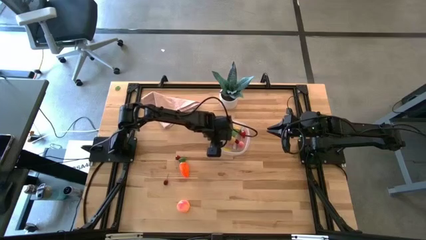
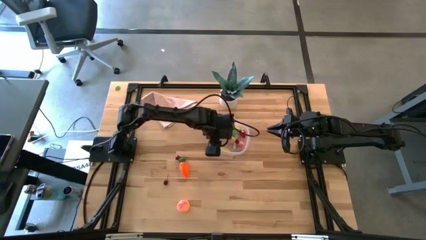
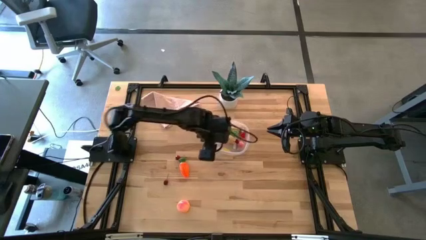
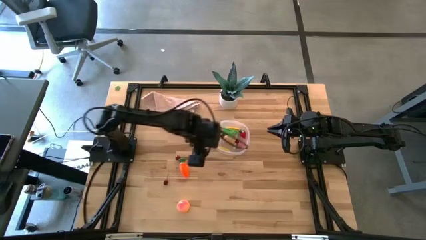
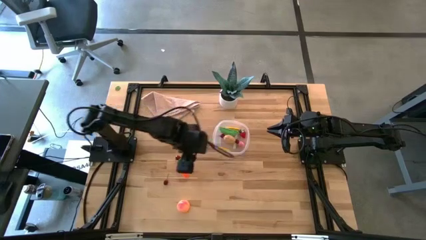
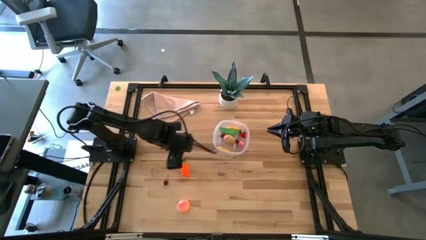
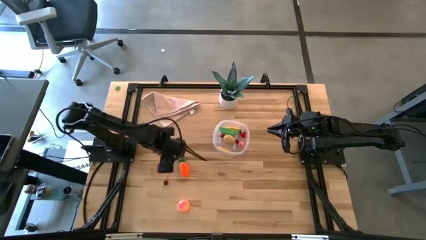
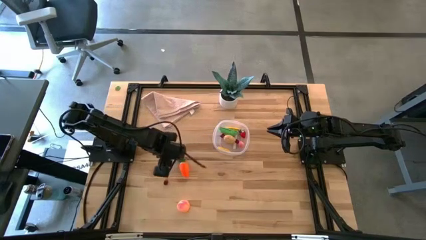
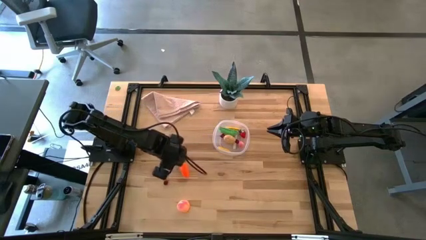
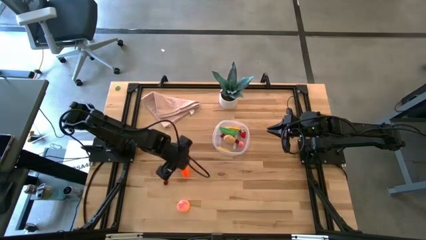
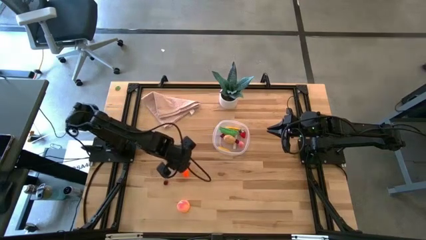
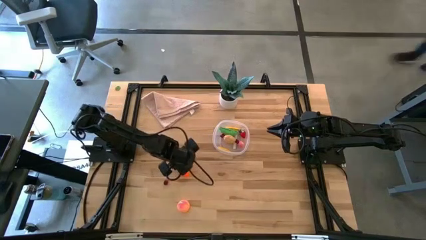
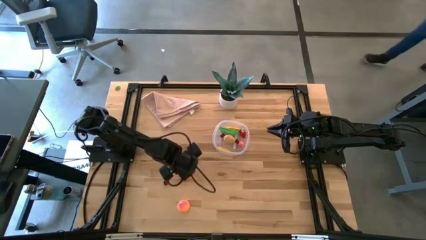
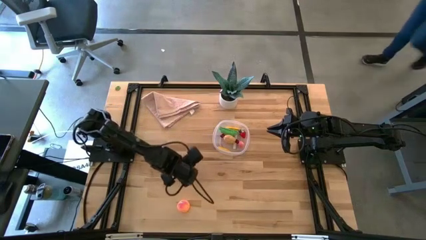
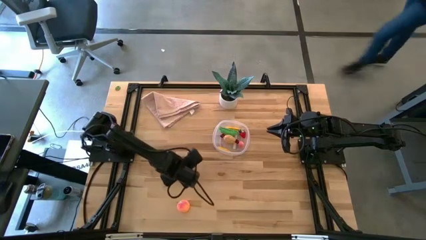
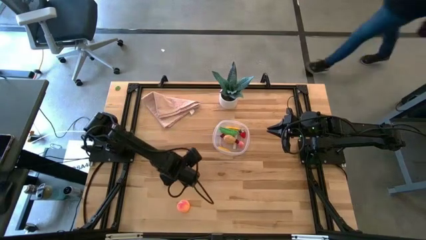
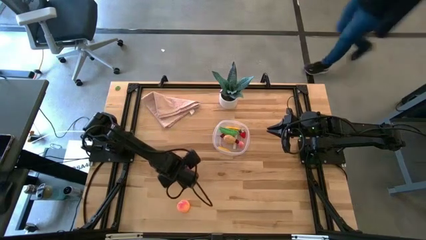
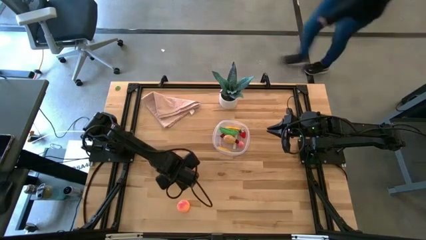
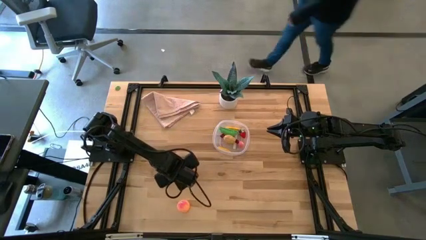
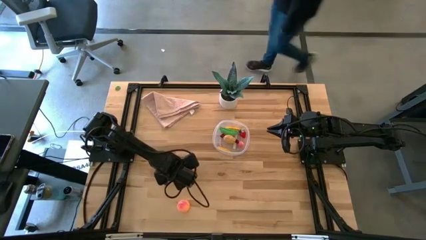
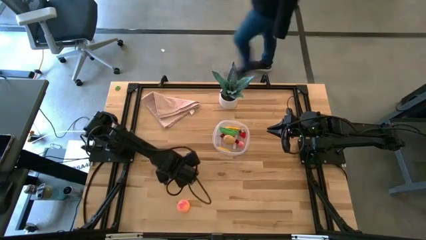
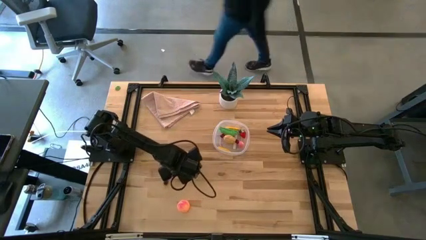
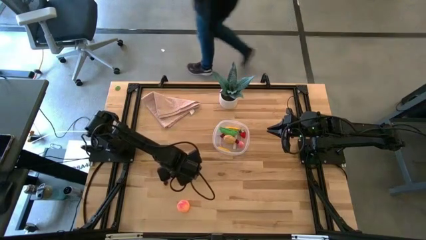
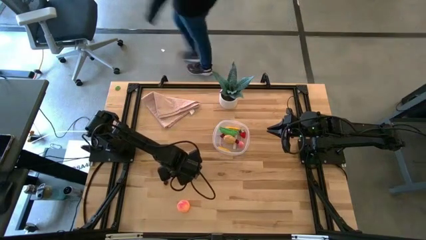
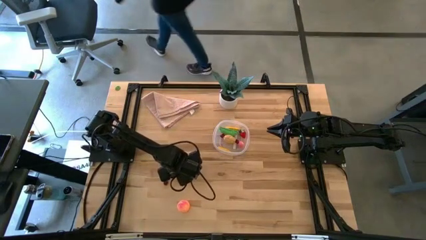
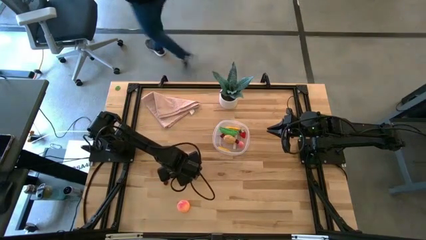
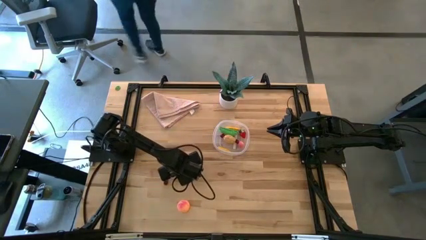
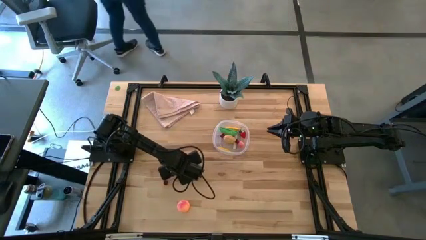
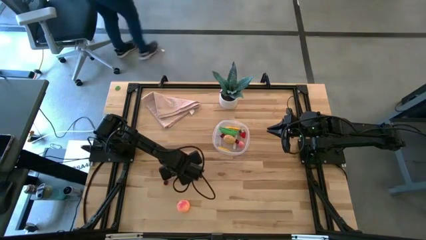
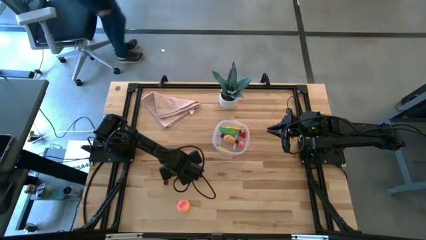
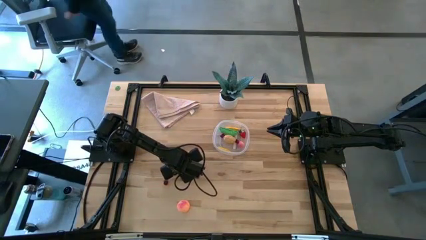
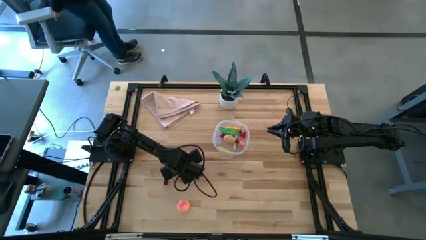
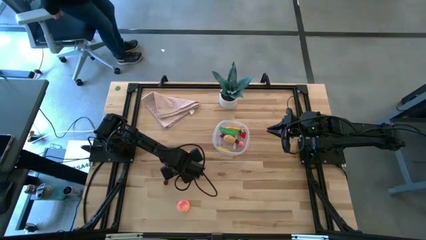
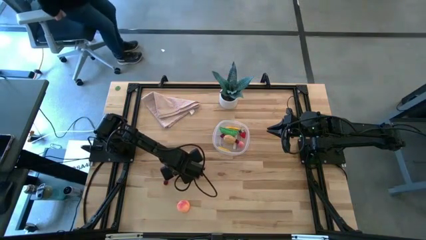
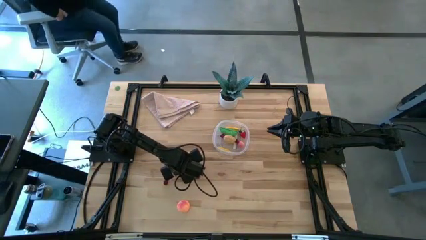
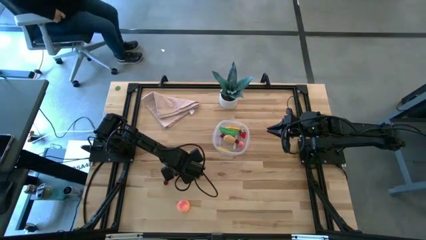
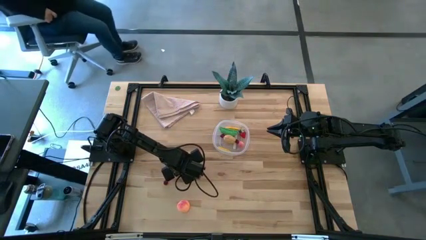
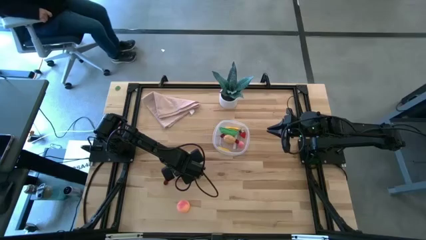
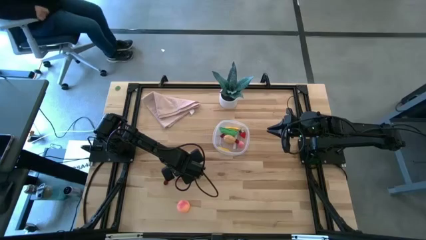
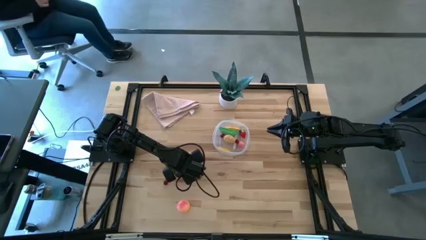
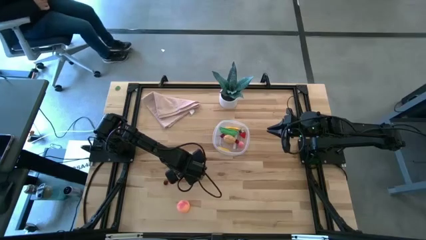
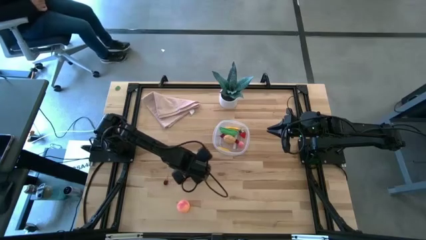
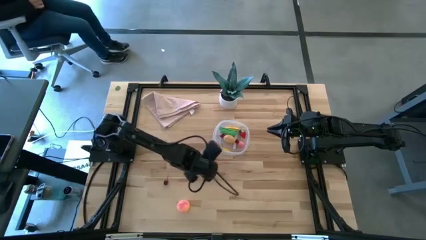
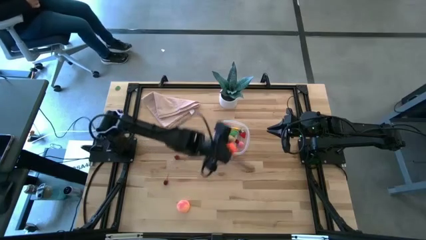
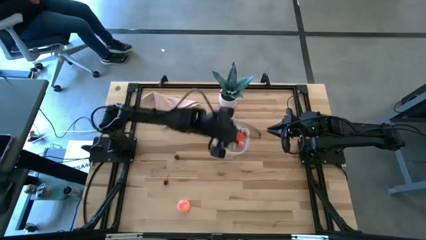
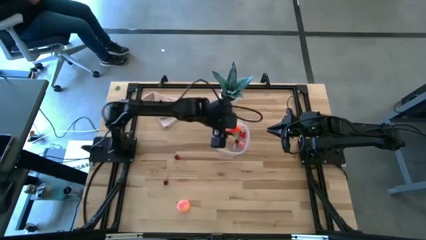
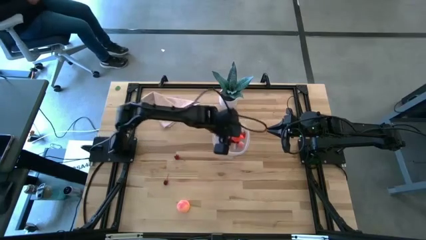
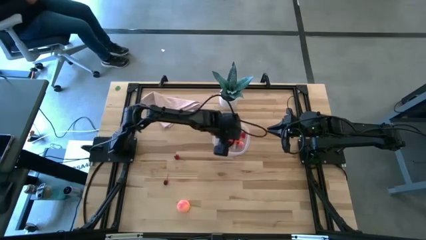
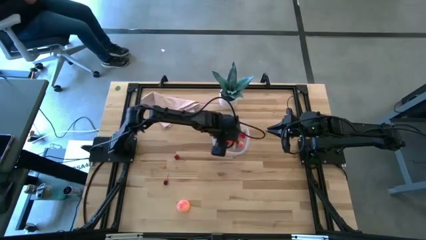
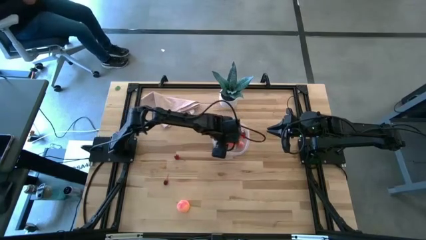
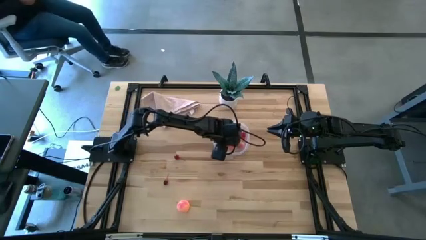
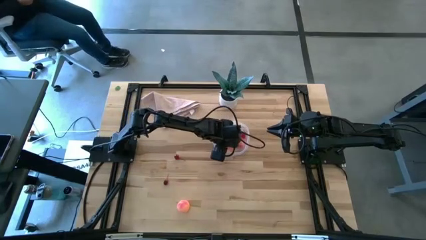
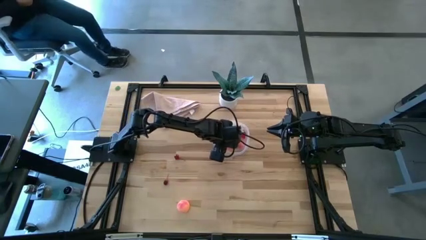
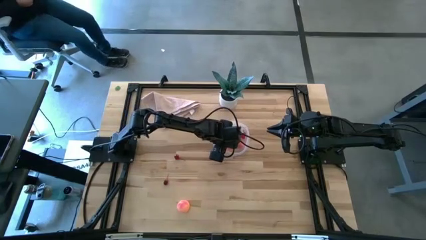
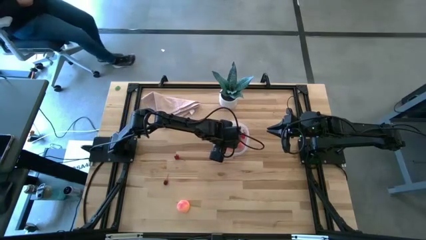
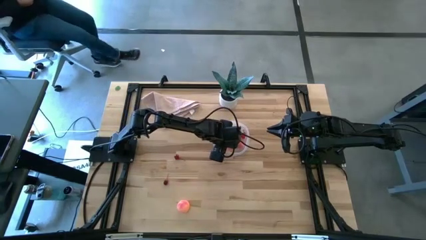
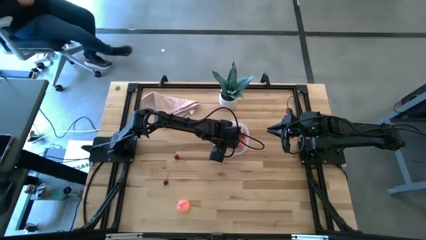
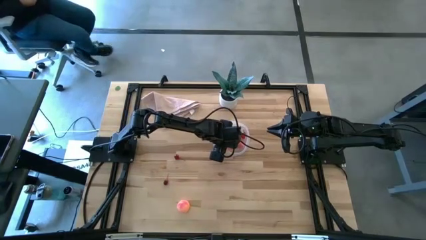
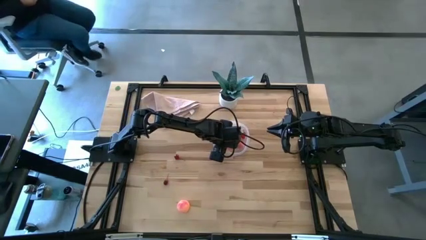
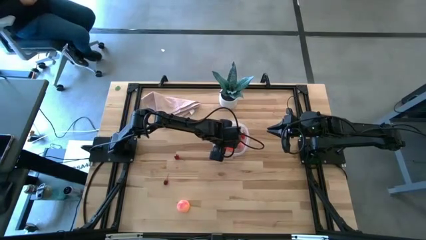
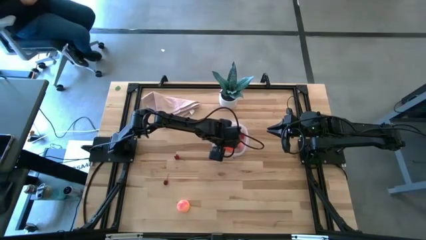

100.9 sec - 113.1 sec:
Task: Pick and placing Produce into tupperware
Put the carrot into the transparent bin
